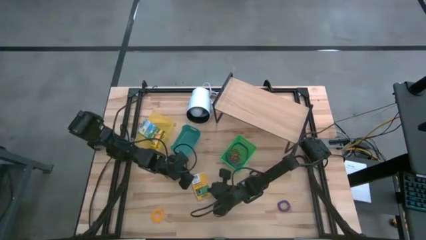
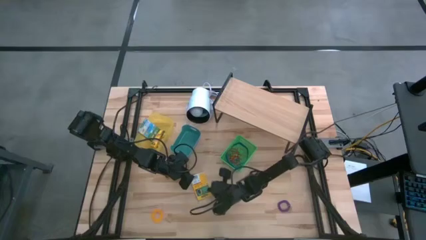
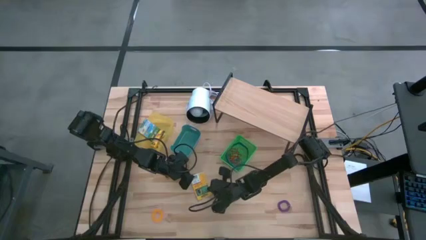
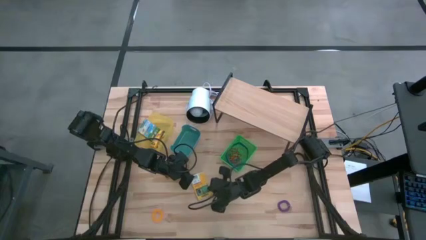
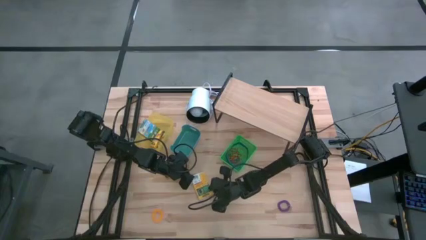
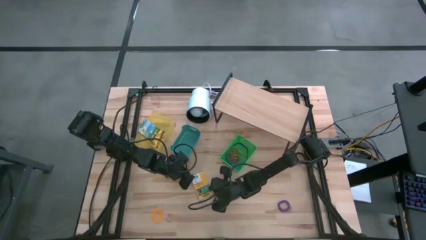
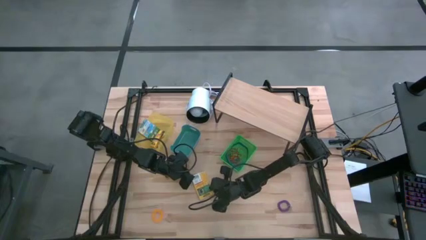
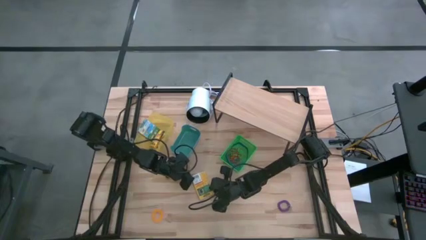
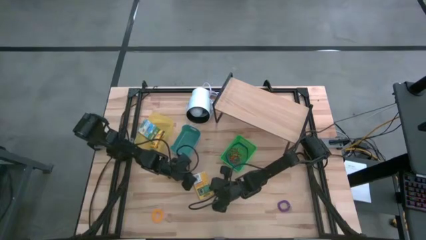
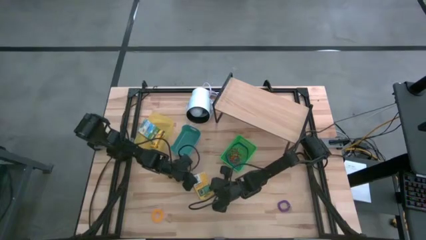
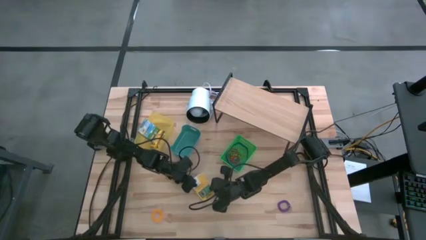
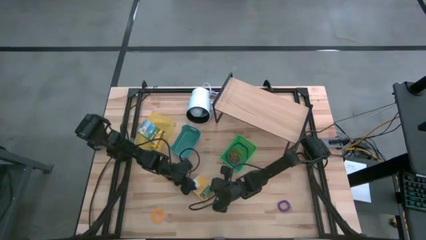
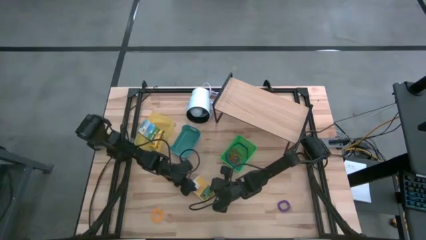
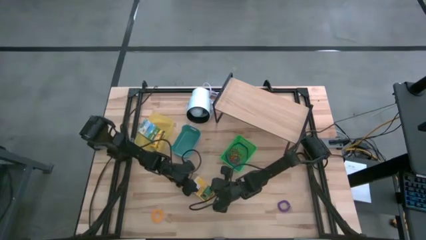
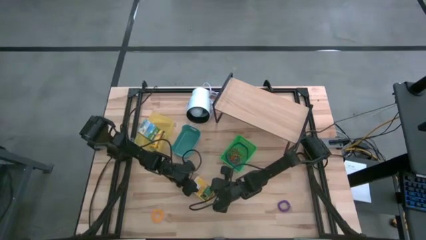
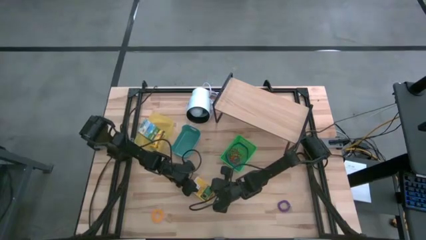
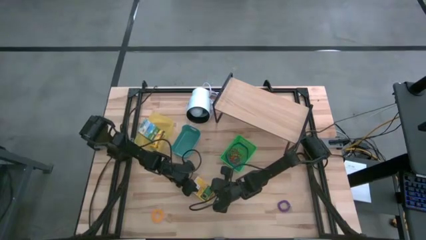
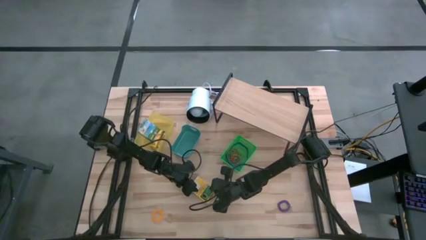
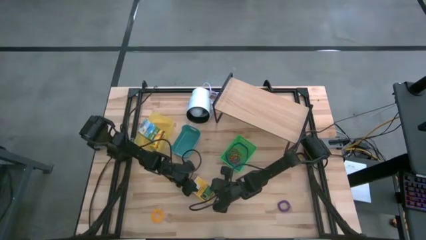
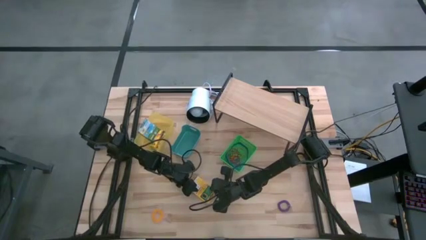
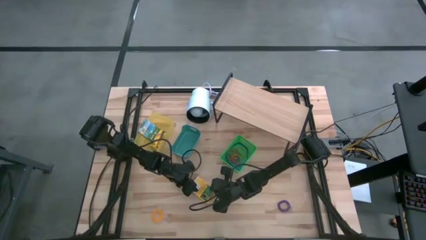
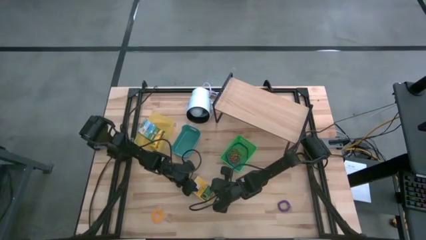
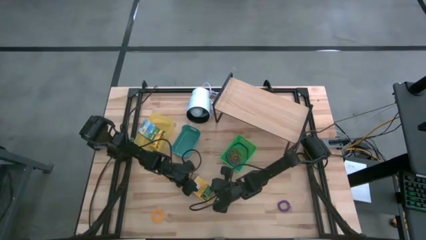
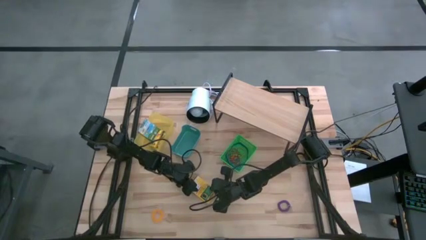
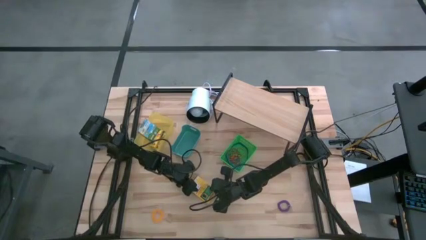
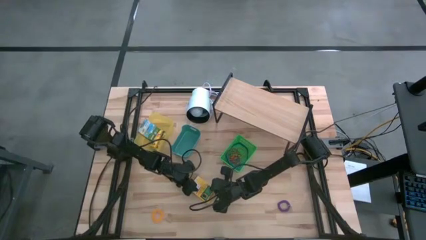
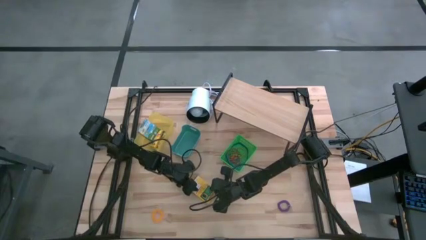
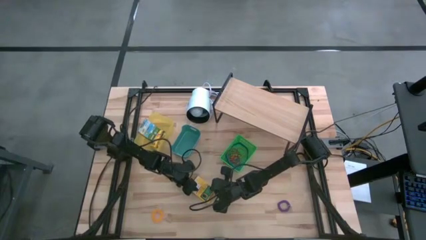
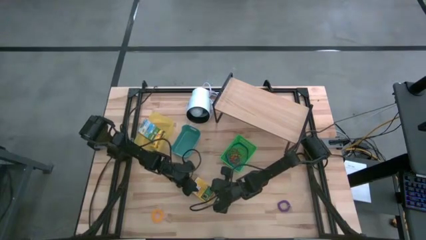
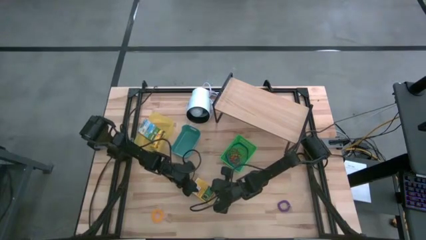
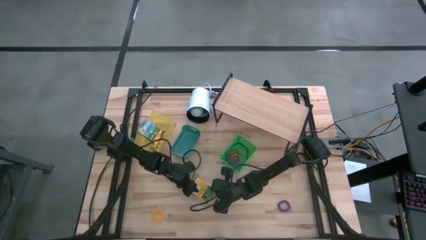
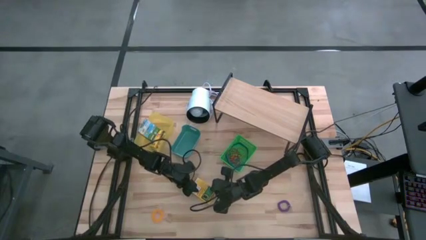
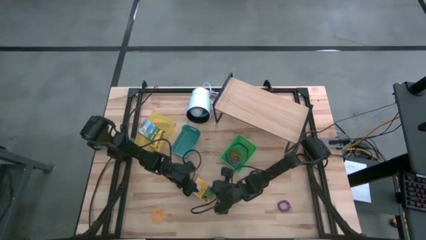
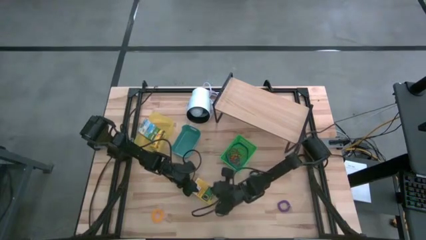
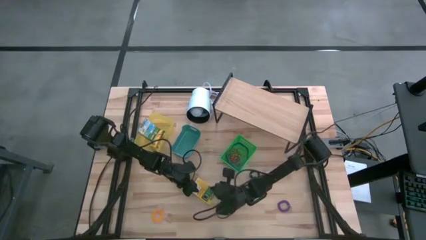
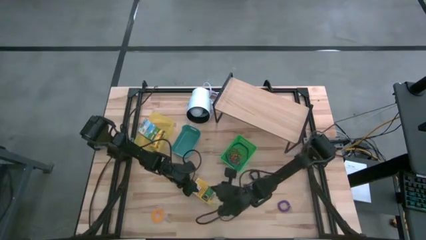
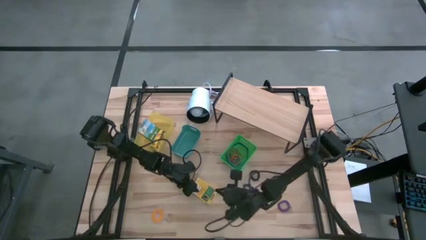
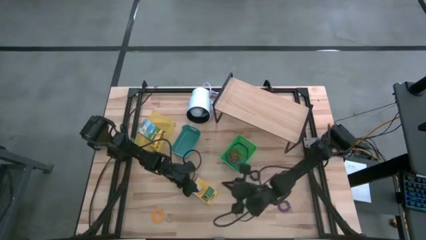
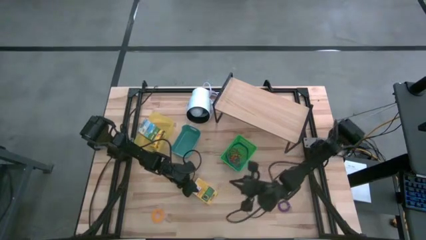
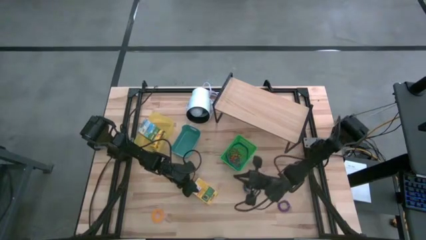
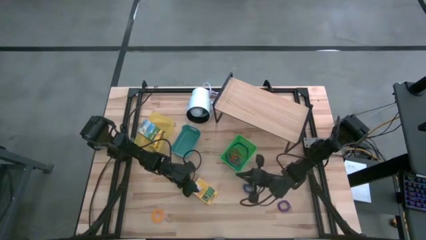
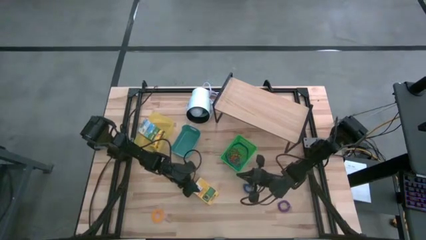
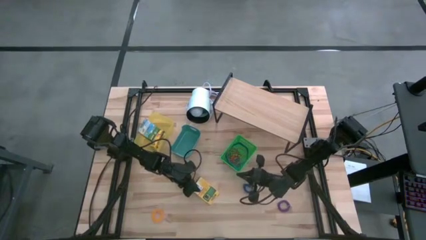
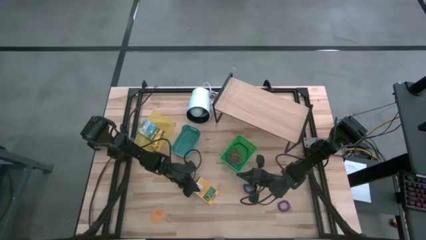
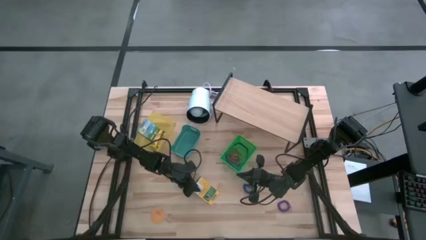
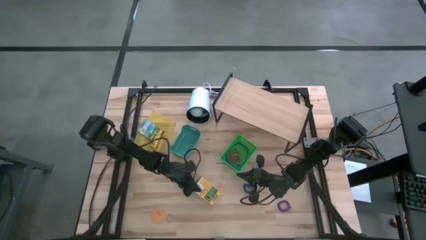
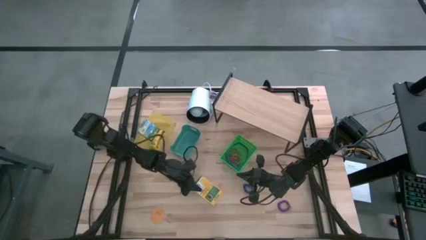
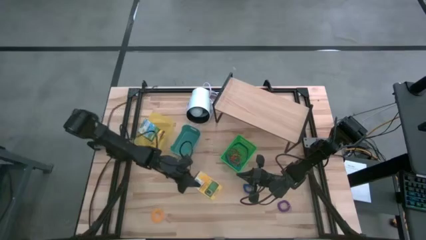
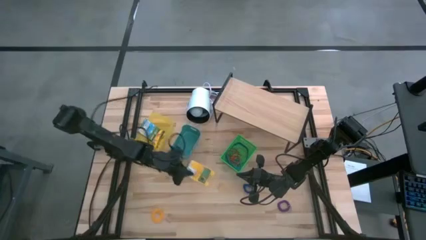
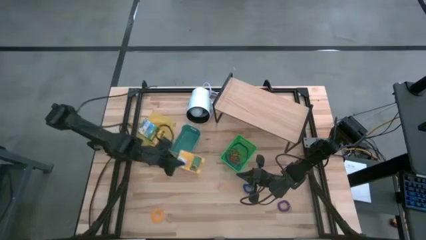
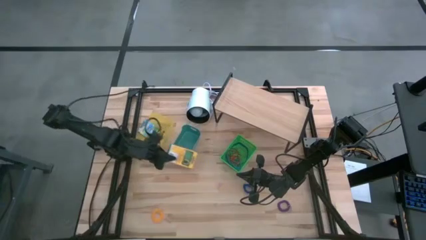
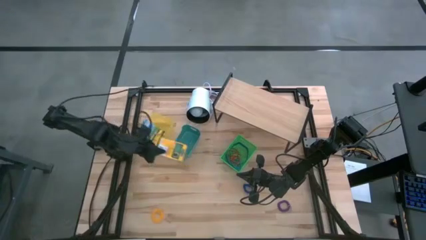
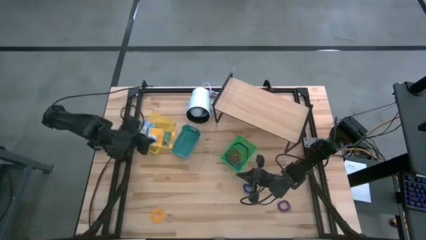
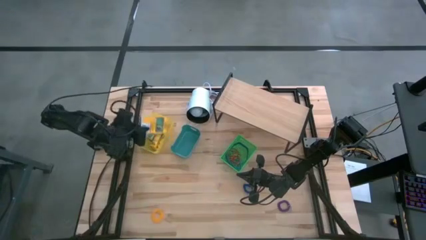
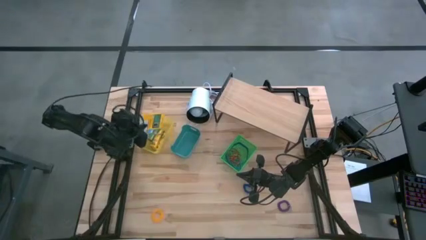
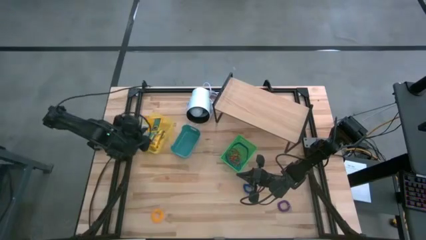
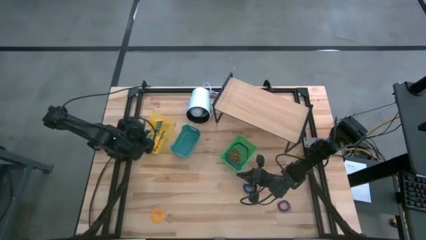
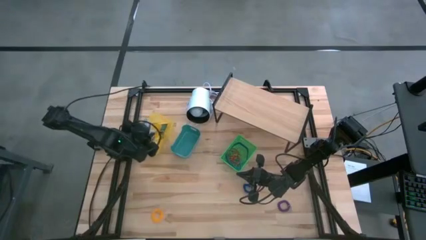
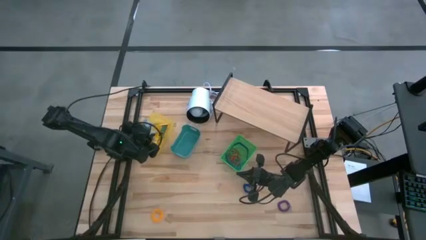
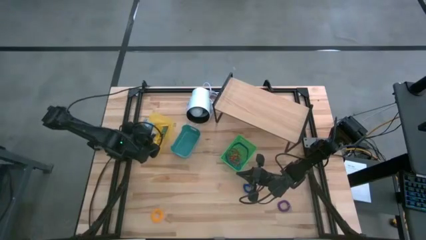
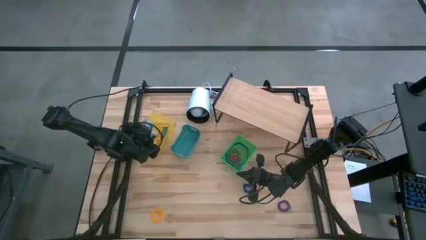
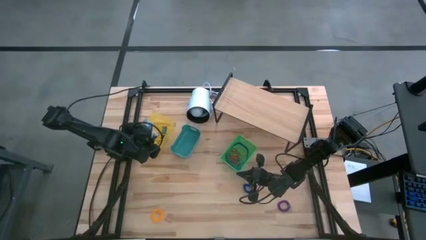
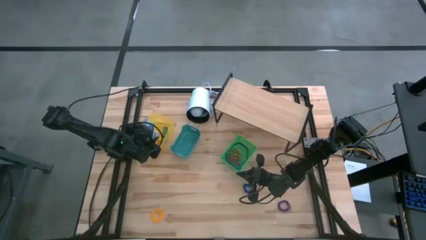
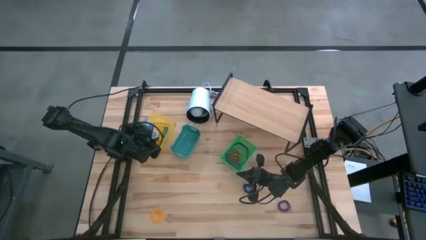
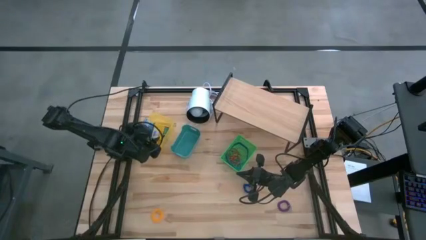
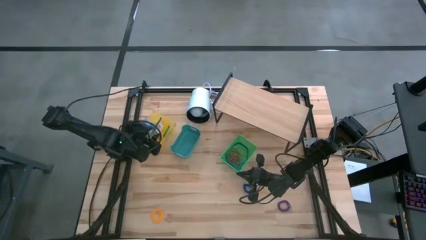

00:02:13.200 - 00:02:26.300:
Task: Pick & Place Office Desk Supplies
Put the big yellow crayon box into the yellow bin
